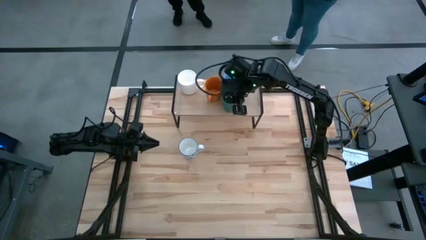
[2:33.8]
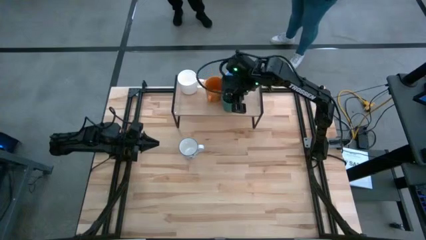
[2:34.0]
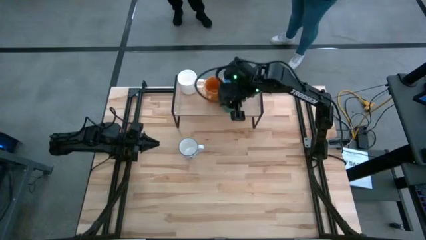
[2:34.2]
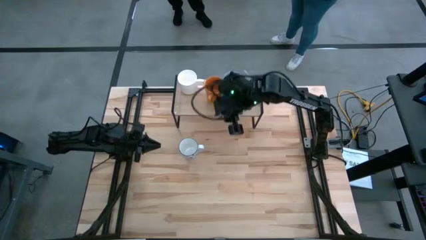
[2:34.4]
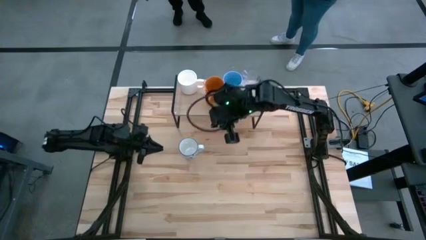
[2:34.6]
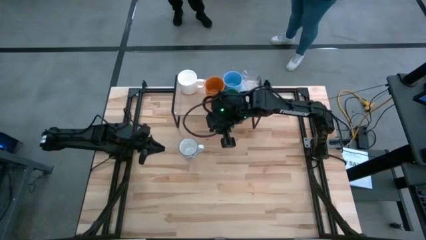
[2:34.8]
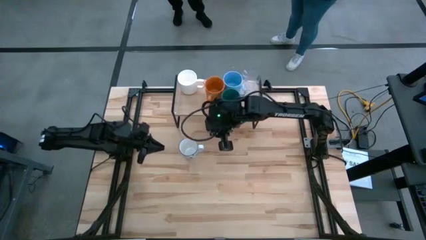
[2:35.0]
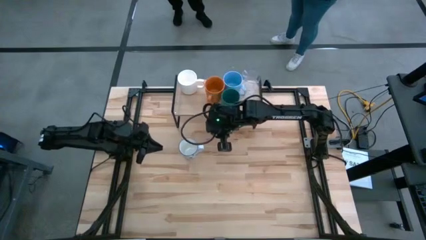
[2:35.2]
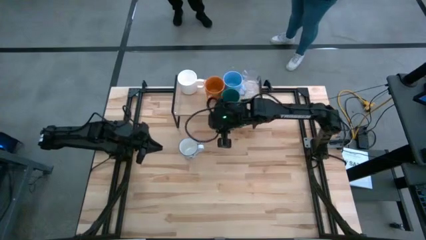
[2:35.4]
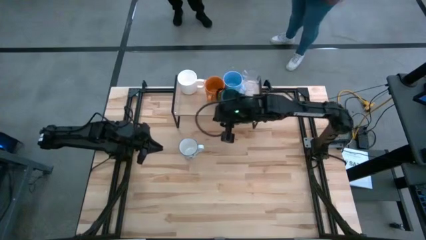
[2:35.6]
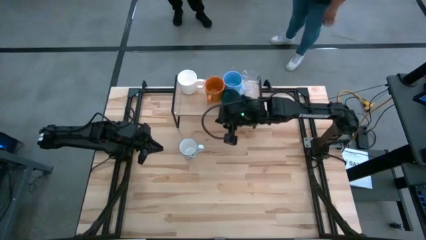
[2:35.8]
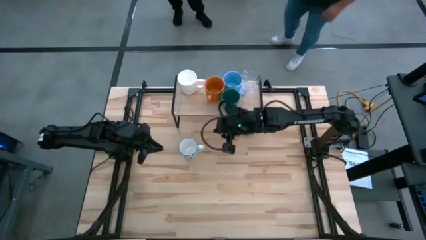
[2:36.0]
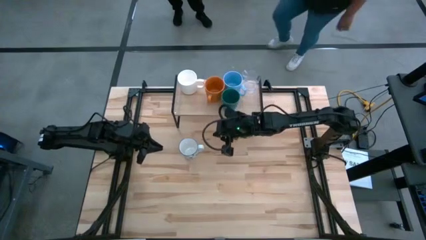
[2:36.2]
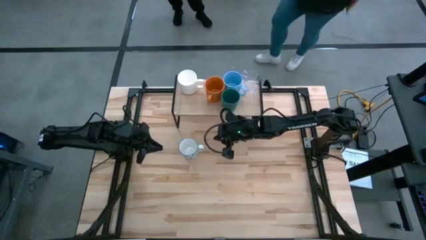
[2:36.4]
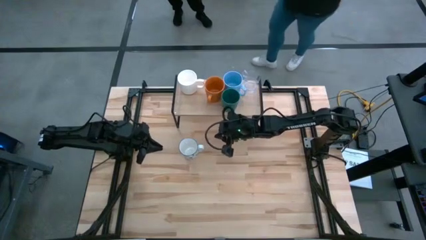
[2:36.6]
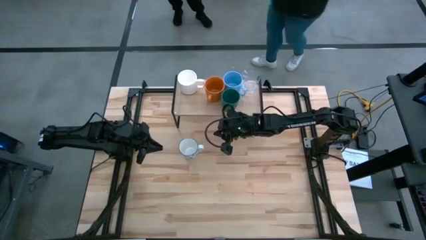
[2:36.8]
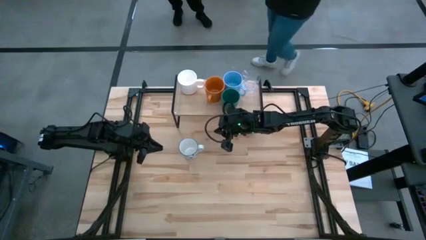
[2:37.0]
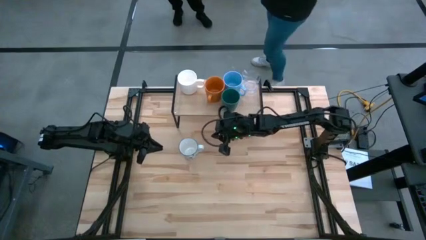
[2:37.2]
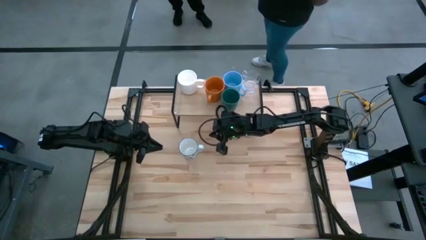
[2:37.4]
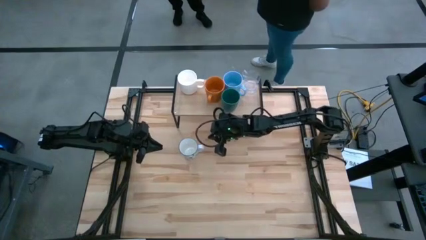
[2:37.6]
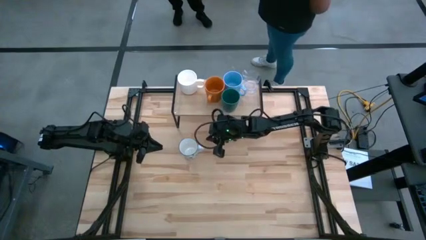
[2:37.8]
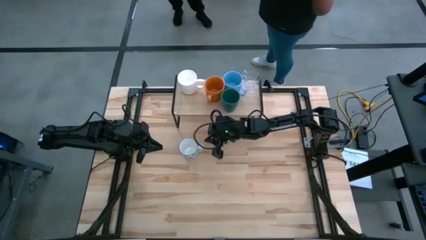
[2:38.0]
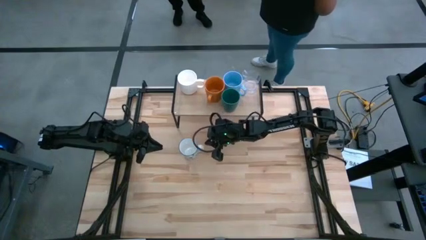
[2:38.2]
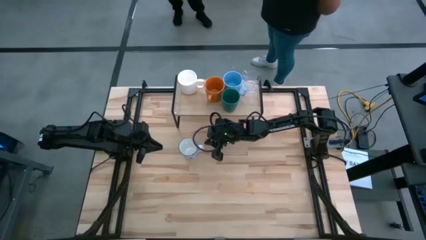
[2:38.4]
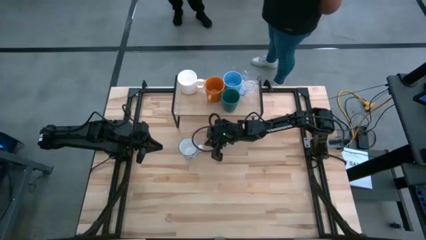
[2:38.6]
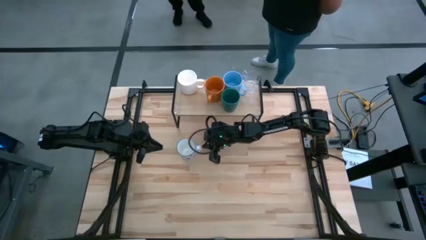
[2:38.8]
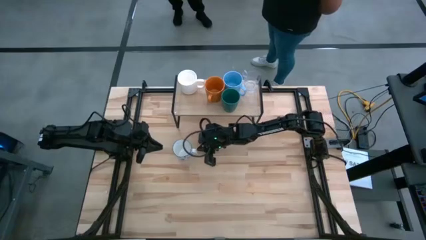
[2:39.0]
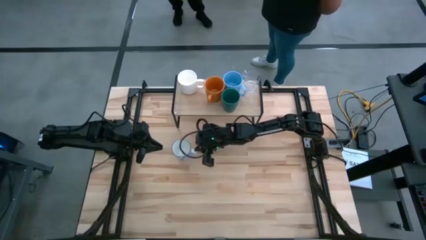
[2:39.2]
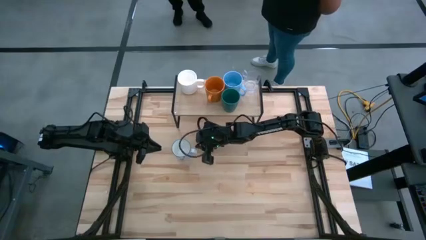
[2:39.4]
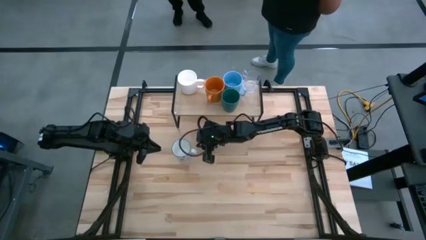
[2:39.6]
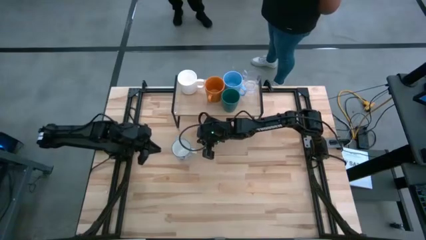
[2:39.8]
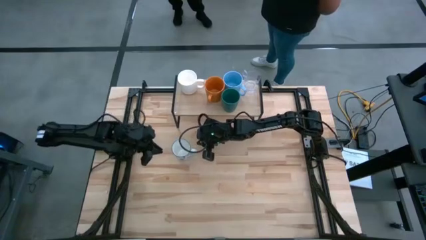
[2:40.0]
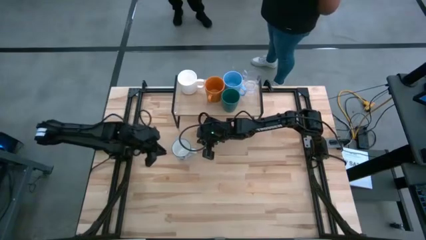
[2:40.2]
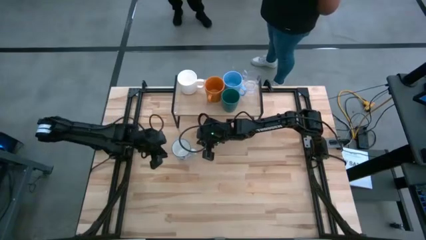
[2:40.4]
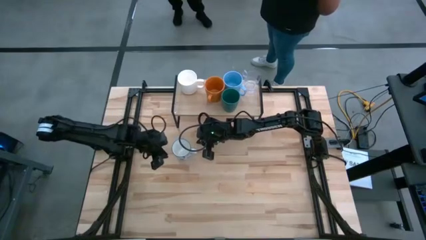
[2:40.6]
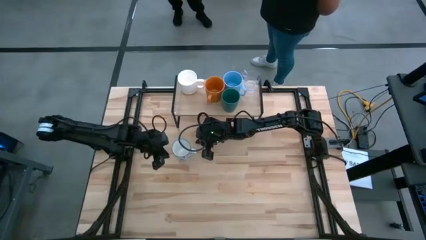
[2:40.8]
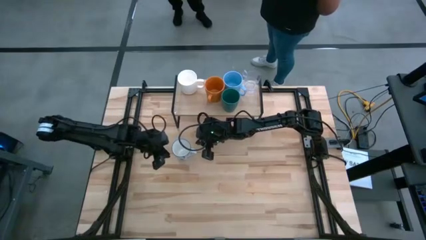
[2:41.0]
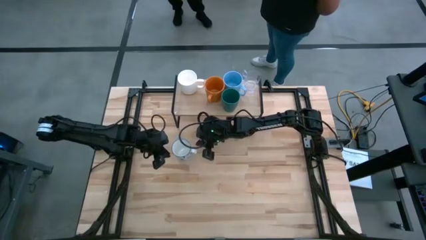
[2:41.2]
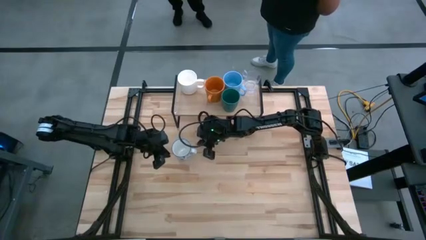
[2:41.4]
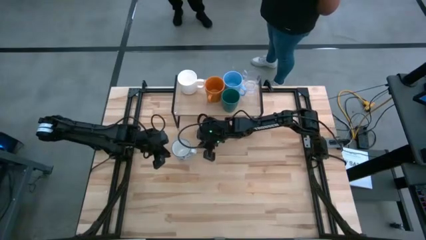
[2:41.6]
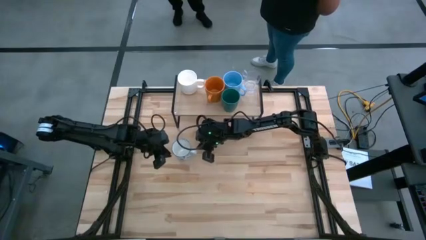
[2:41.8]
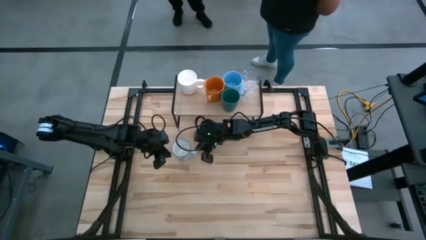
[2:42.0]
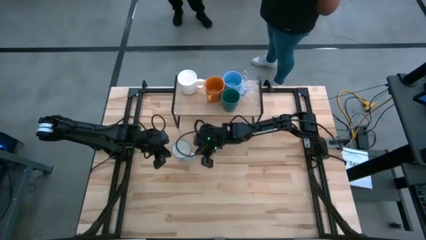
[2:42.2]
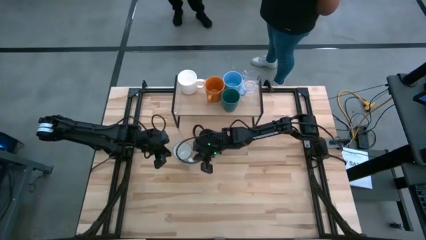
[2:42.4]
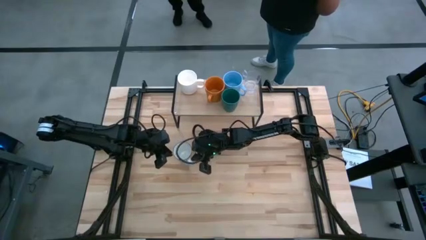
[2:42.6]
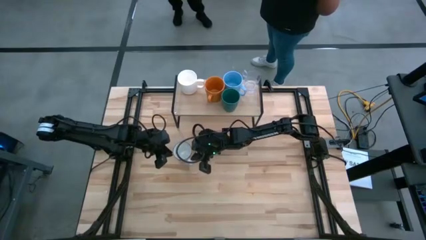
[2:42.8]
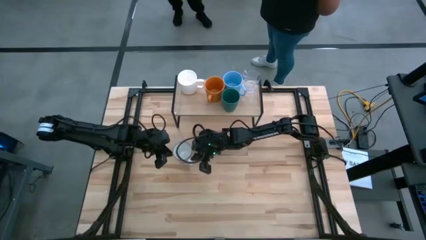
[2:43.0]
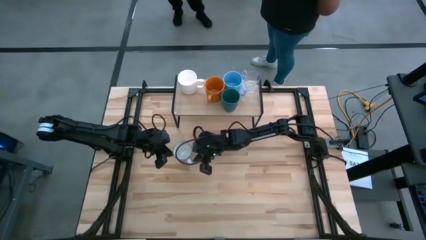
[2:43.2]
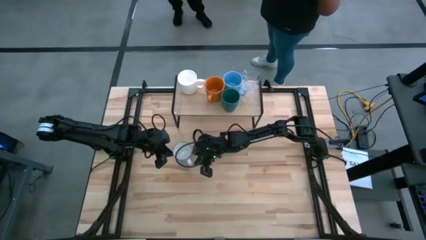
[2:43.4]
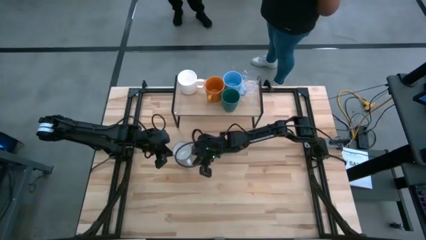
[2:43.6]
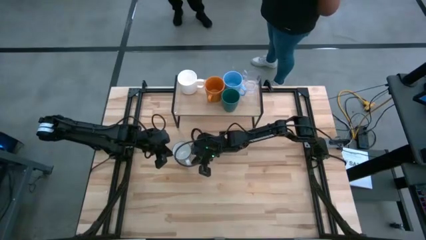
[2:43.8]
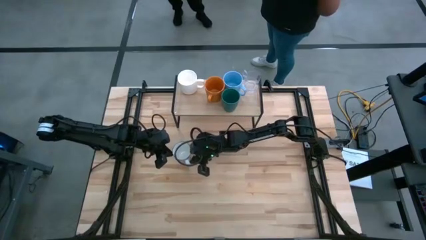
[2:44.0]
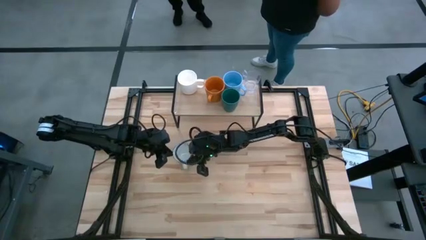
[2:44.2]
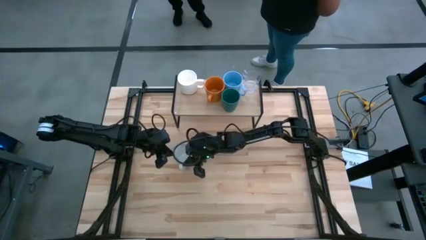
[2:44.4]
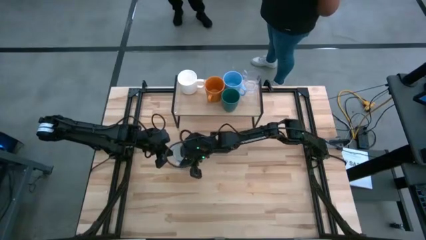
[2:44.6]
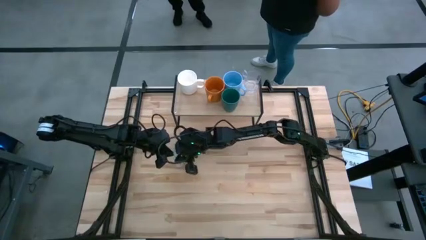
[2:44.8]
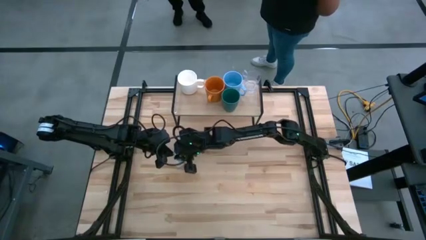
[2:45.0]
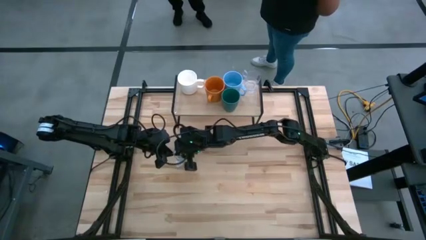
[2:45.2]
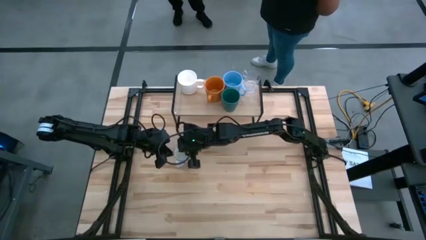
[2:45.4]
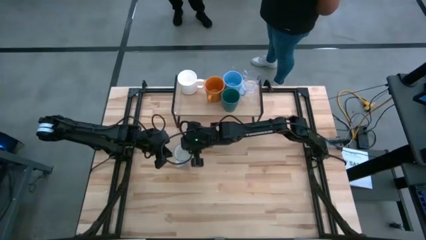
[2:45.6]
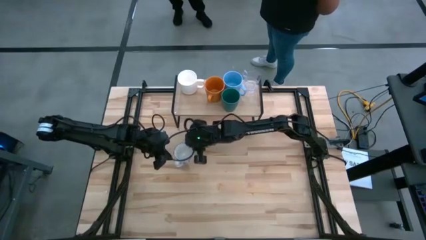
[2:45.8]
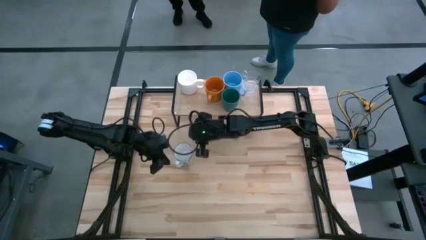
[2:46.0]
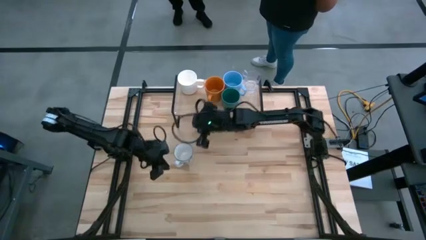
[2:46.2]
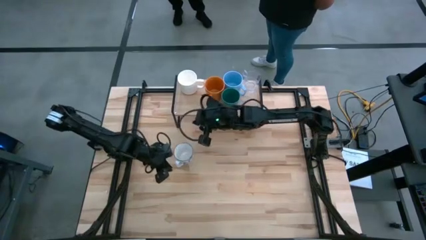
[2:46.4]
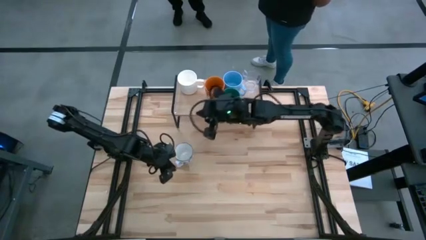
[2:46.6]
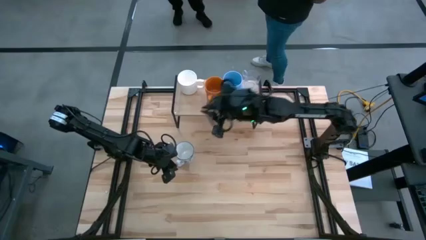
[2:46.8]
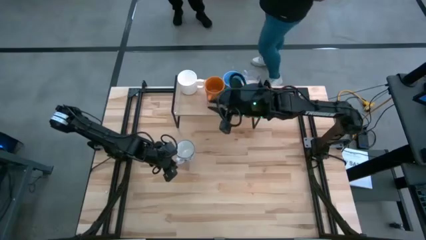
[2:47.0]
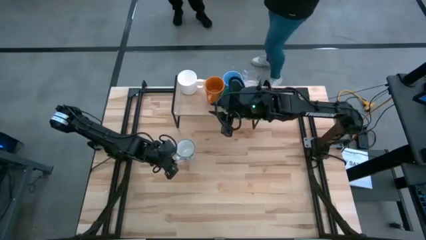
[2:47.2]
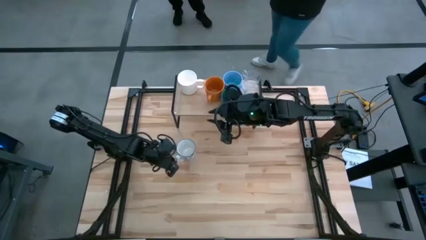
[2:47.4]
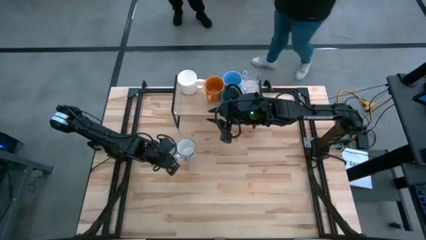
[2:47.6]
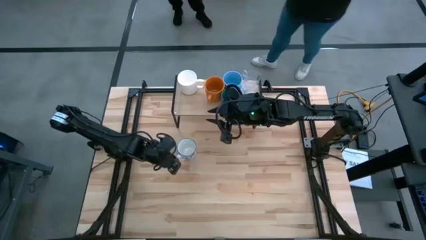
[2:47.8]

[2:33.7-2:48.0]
Task: Stack small to large cups/mugs on shelf
Put the white patterned mug on the shelf

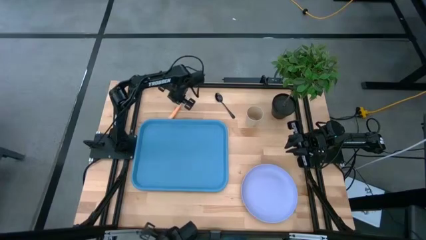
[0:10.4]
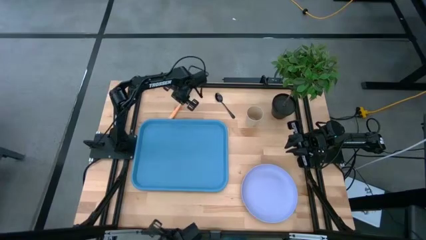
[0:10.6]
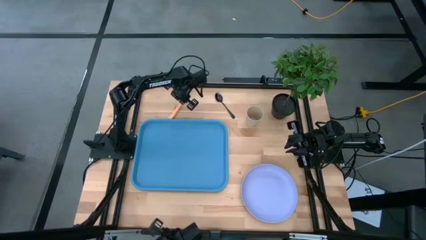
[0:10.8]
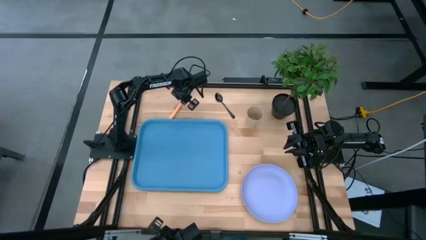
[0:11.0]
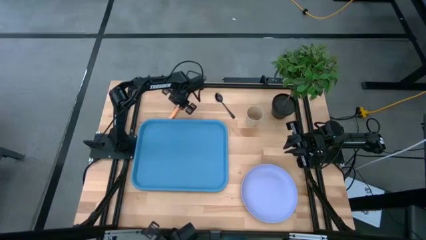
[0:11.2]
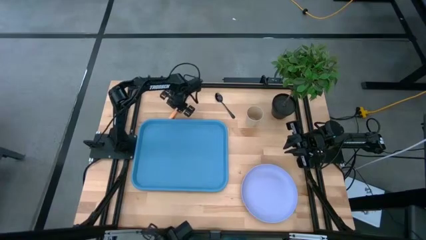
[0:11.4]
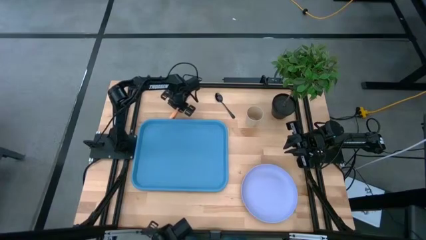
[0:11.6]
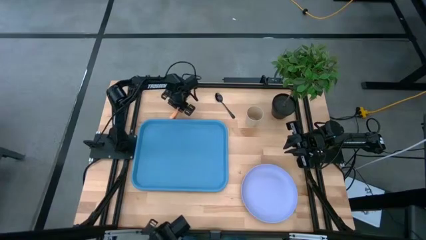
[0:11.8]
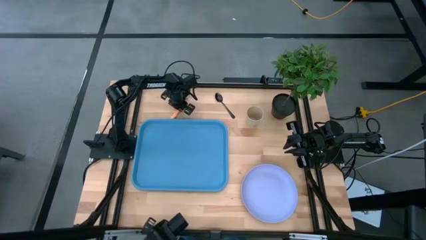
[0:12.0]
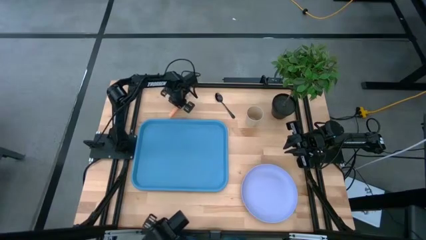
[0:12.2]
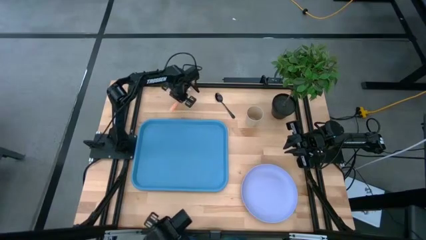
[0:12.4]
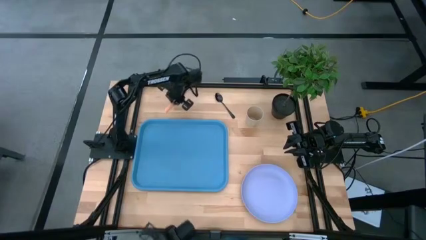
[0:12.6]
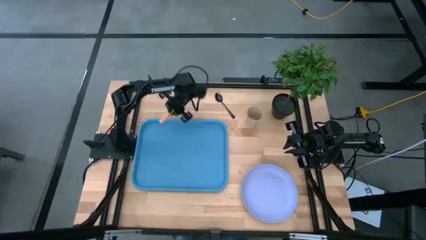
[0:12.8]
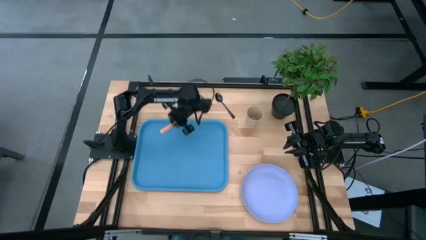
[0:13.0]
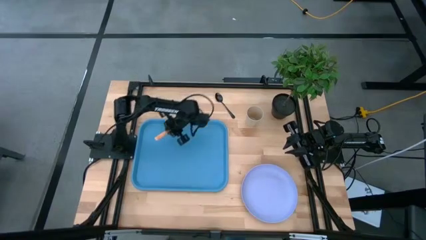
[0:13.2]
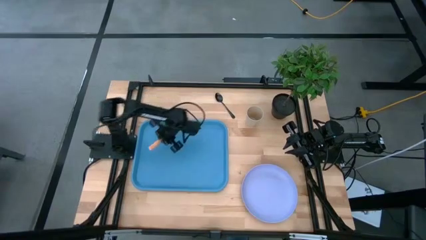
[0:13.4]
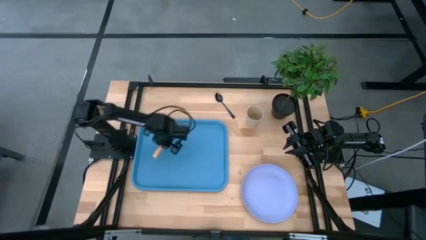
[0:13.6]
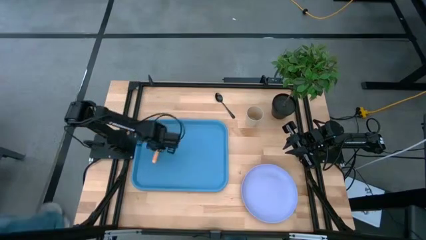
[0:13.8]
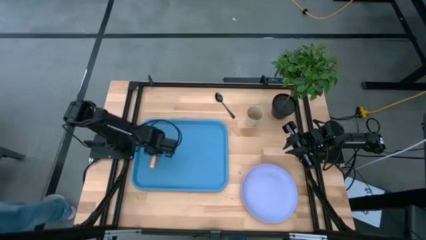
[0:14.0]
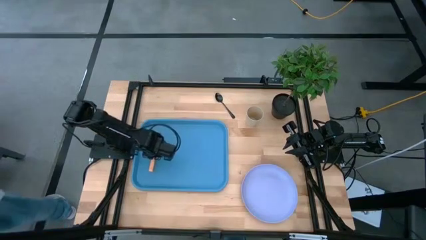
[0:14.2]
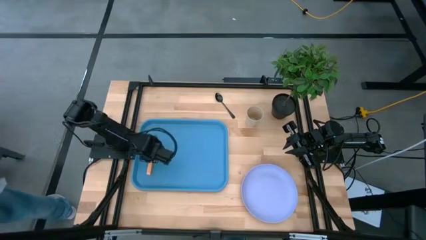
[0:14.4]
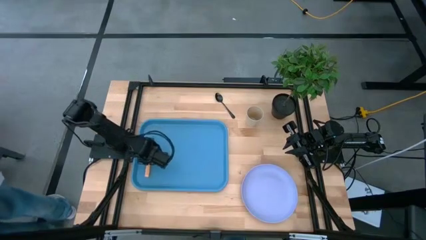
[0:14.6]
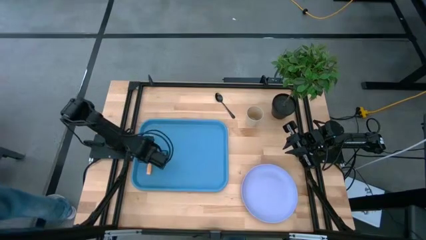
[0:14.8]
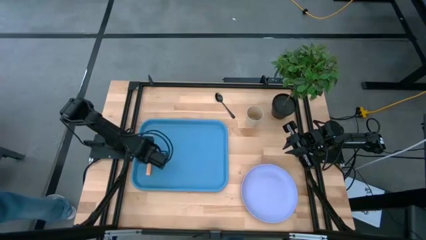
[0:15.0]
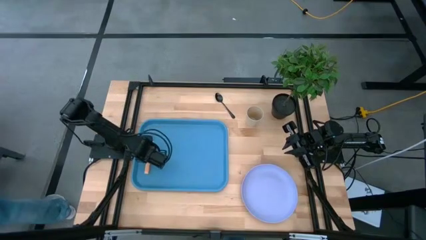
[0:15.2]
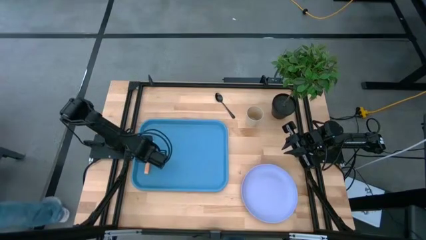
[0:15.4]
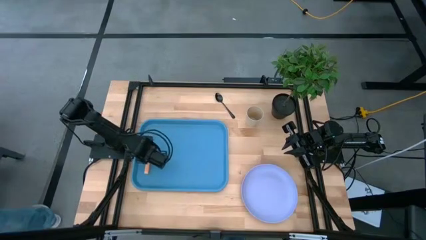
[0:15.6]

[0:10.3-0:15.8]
Task: Pick and place plate/cup/fork/spoon on tray
Put the orange fork on the blue tray
